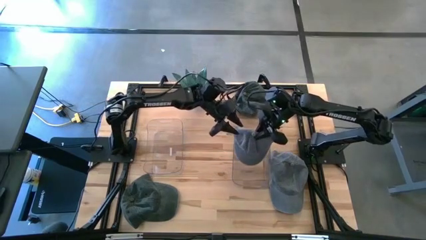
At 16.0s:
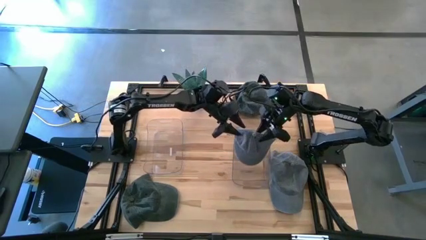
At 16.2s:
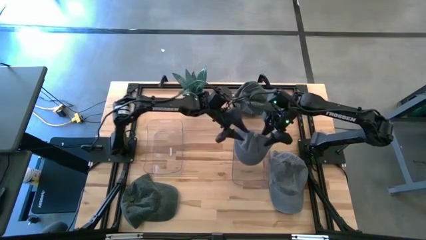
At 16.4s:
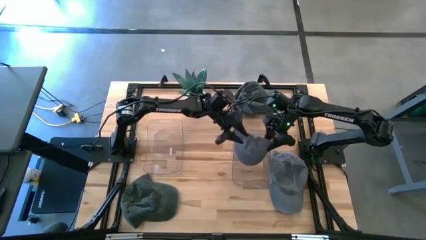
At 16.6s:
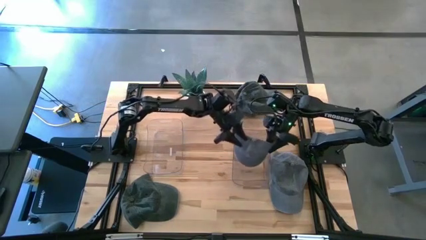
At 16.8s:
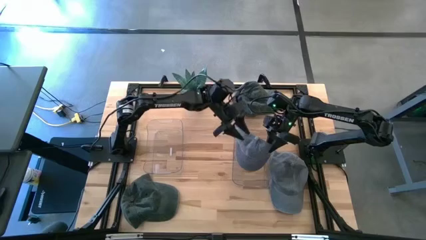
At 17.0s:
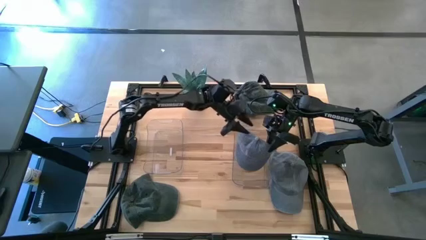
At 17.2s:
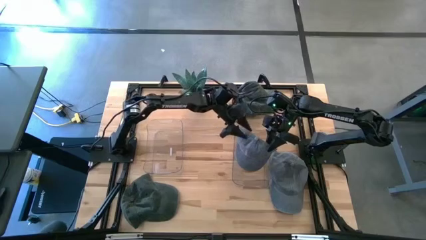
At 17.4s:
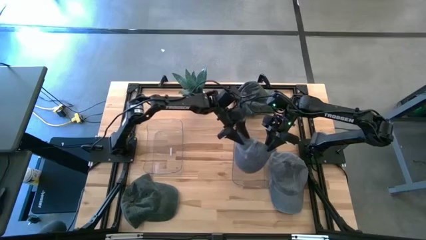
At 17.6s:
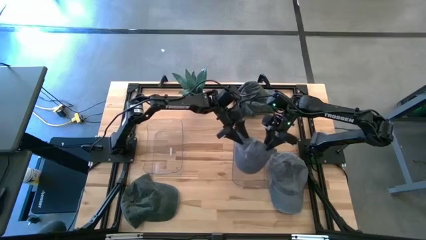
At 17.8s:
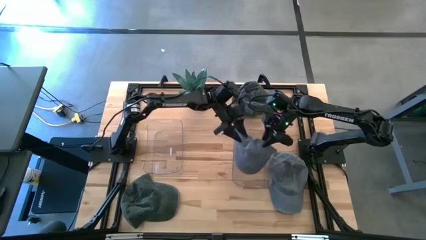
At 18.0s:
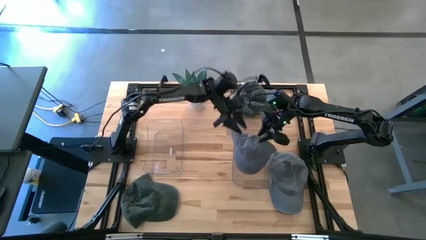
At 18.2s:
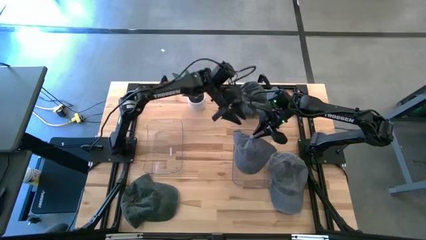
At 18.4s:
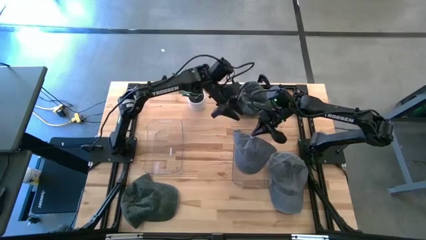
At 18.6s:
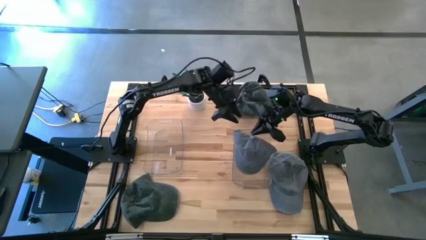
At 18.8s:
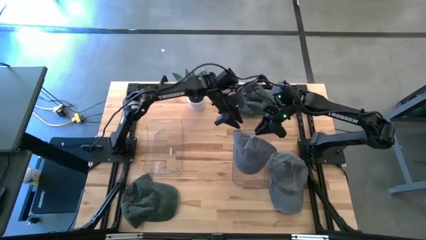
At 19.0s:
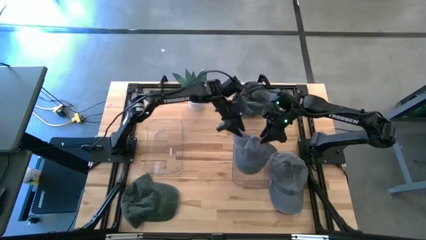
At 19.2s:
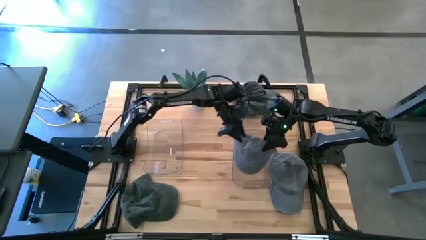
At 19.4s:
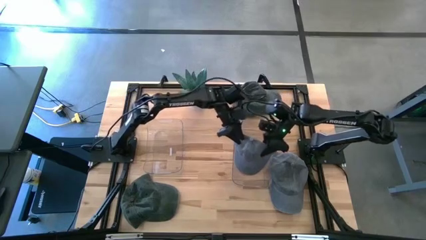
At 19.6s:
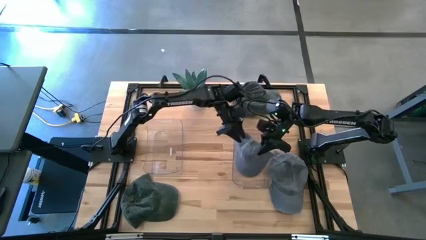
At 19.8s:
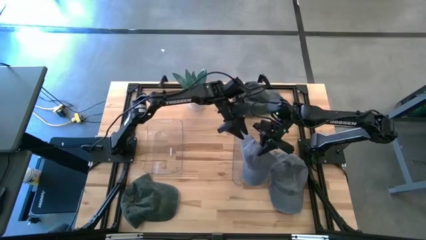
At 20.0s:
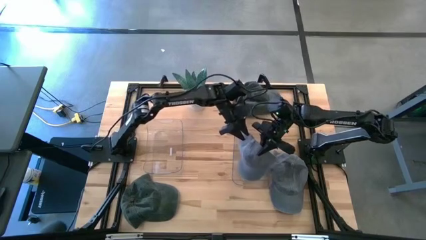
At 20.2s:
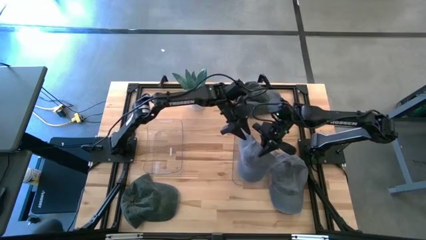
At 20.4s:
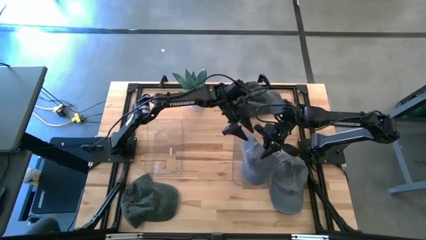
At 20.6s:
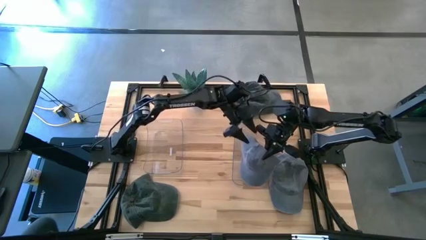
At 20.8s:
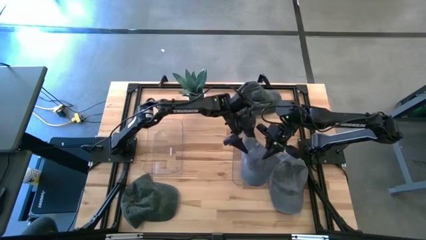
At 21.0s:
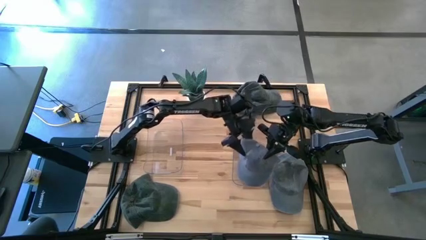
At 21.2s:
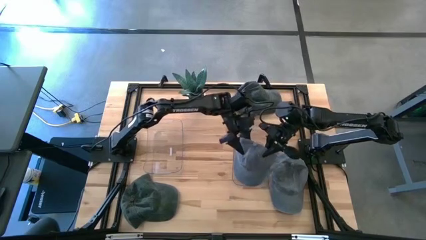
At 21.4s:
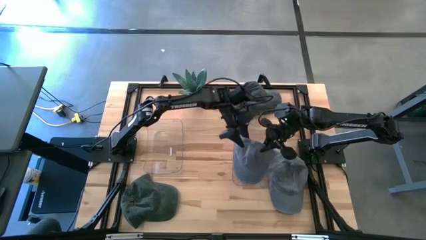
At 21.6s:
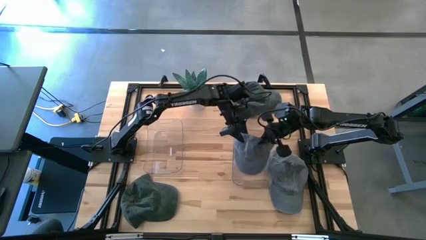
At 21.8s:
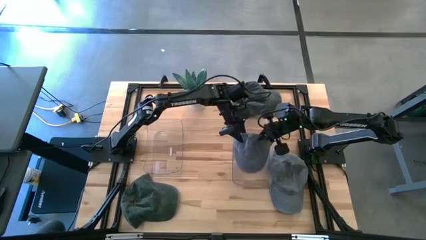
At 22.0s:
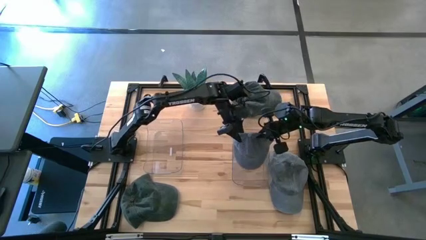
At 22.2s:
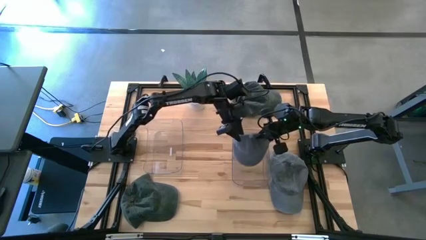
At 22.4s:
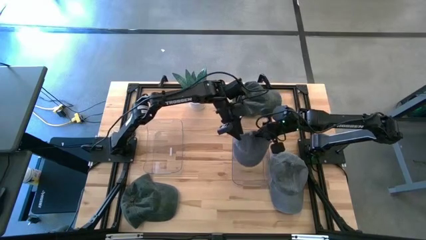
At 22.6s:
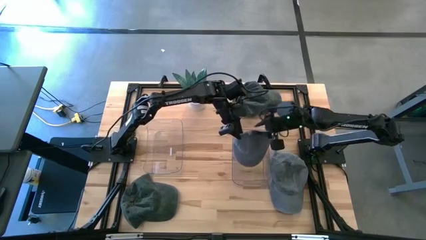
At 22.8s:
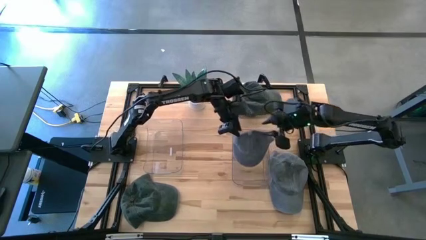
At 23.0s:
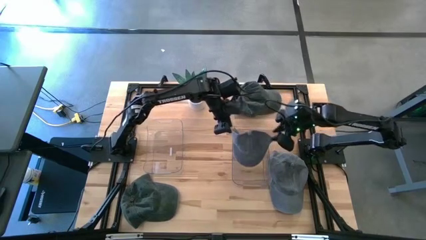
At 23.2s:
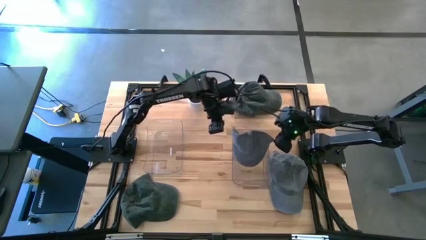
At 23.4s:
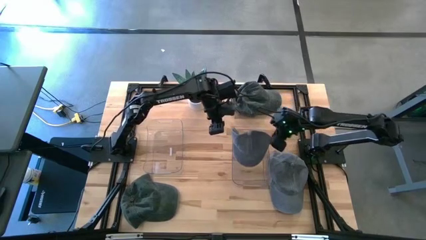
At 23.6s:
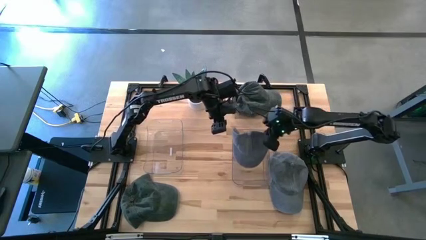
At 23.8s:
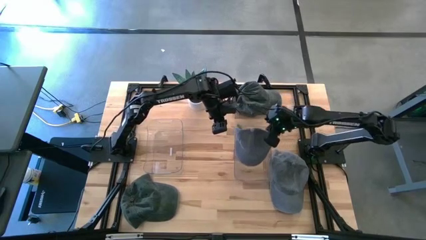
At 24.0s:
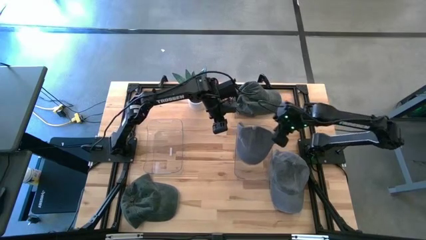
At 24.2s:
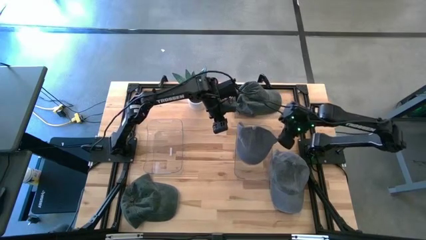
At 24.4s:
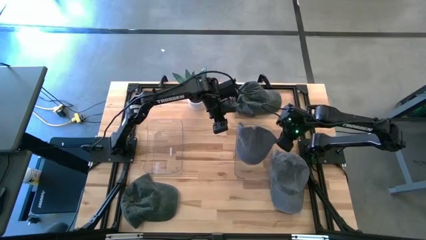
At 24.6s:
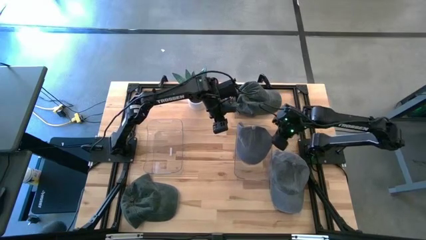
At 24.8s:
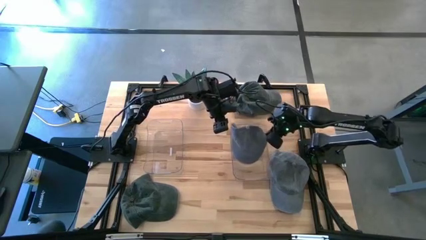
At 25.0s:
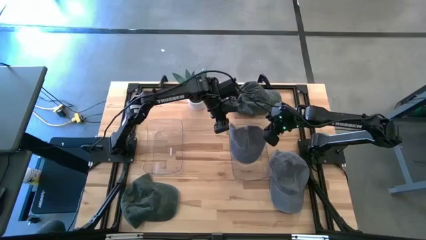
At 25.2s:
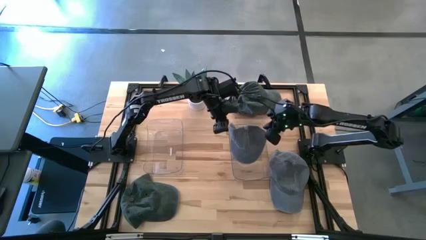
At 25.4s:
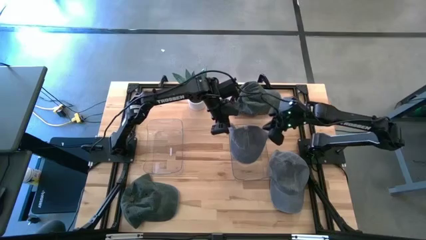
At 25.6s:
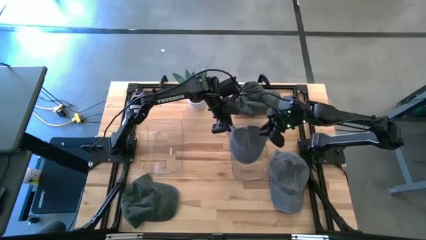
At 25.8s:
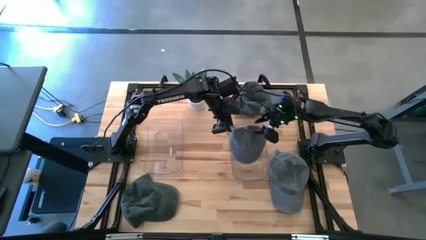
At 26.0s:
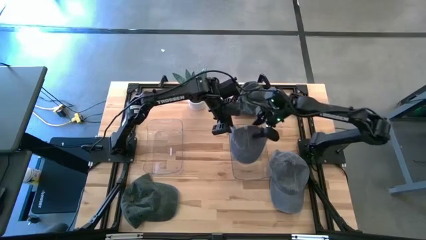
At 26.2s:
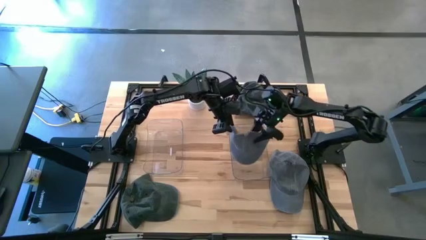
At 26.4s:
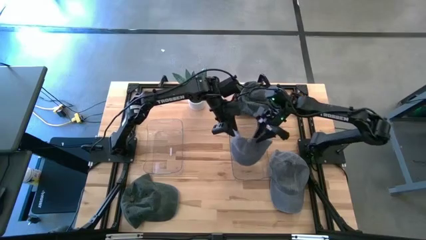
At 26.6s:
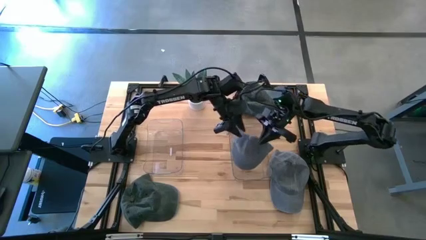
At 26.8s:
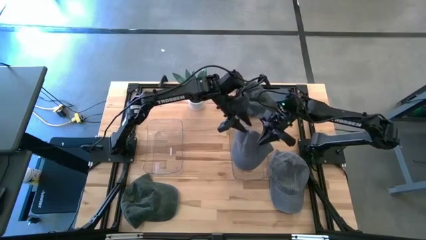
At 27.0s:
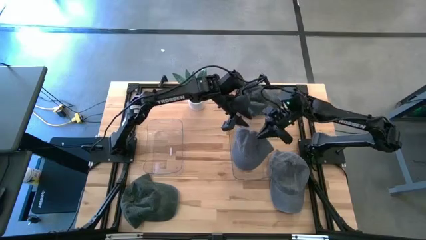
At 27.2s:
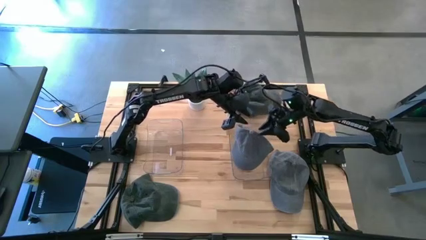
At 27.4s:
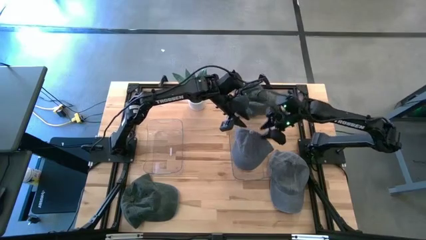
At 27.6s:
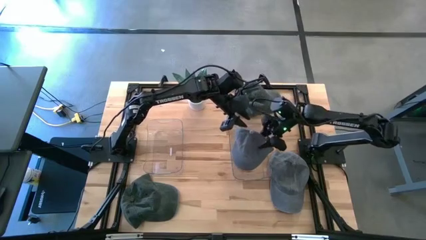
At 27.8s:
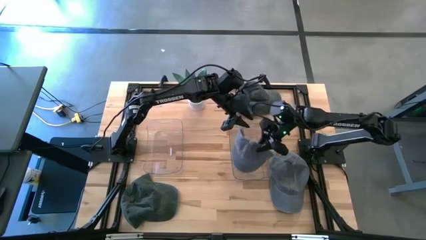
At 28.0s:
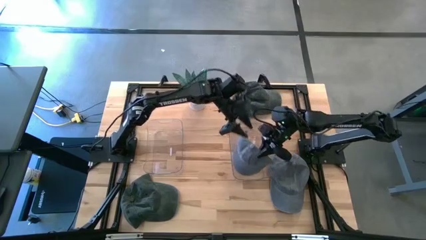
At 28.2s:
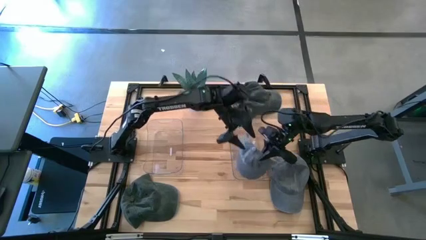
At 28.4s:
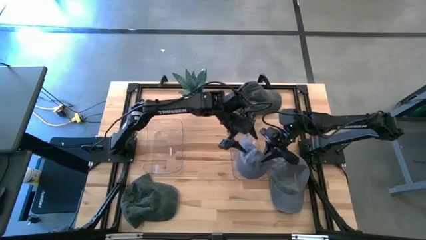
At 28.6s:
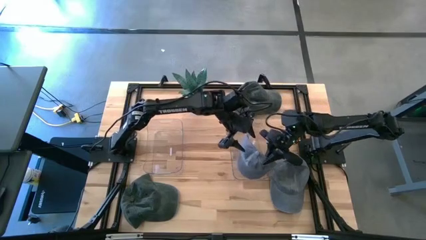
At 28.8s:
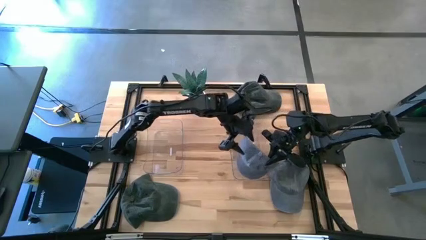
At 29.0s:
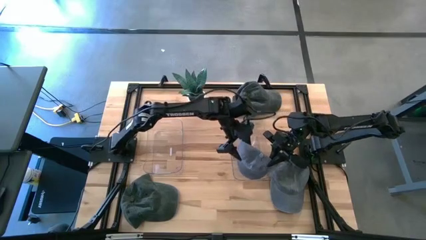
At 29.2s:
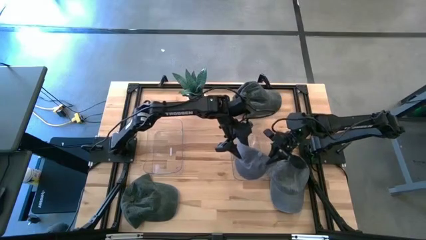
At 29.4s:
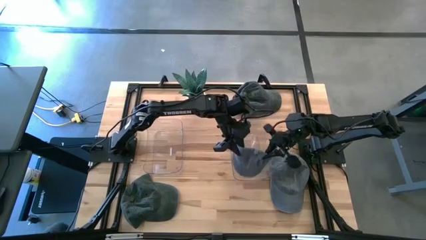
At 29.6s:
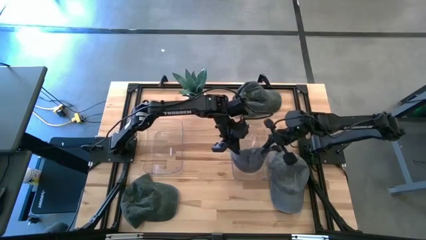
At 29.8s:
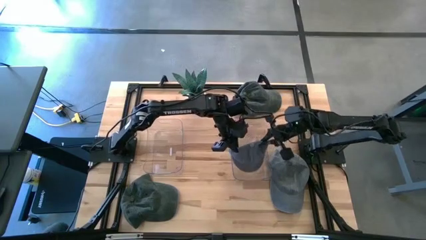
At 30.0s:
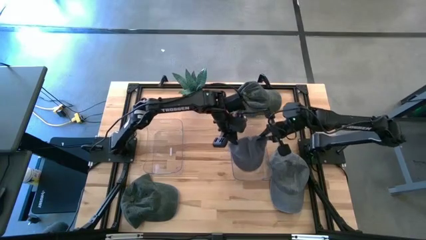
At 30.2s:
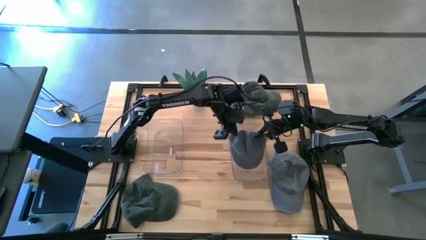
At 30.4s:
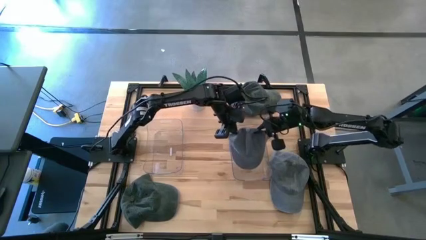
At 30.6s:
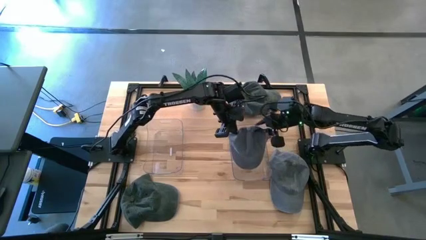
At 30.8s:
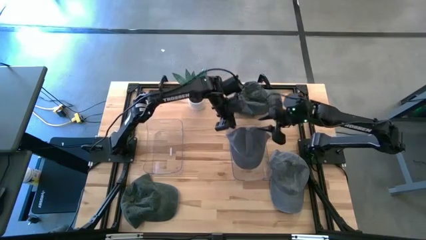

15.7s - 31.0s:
Task: Pick & Place hat
Put the gray cap into the right transparent bin

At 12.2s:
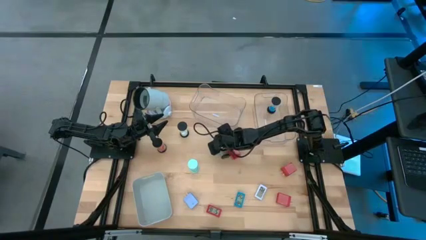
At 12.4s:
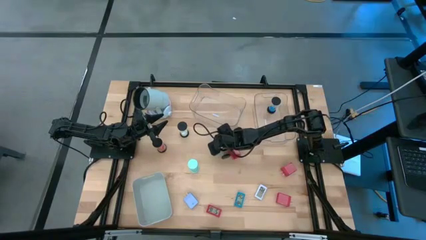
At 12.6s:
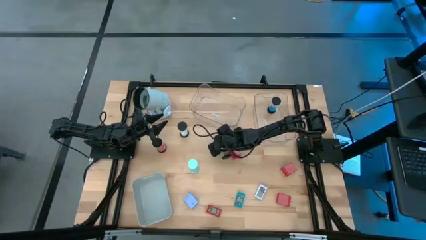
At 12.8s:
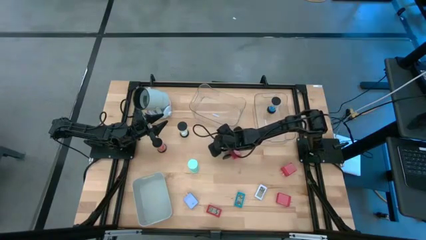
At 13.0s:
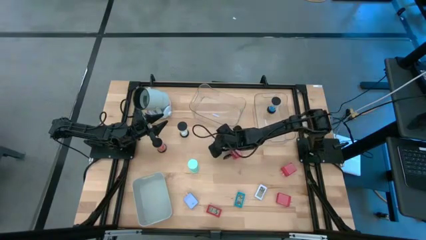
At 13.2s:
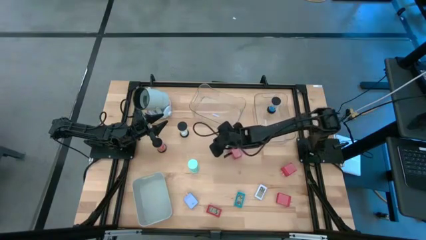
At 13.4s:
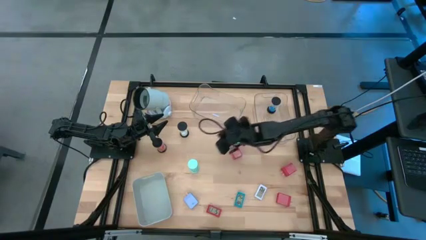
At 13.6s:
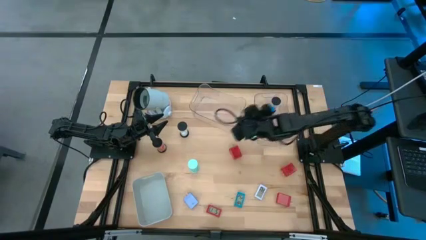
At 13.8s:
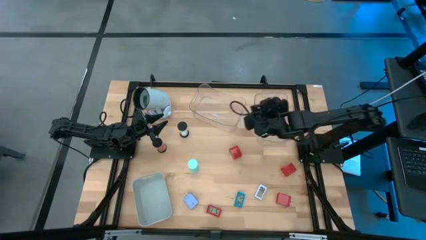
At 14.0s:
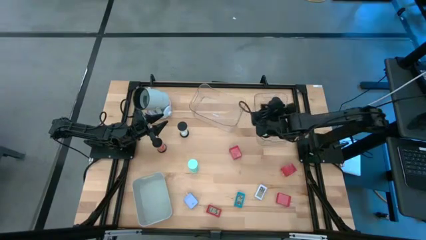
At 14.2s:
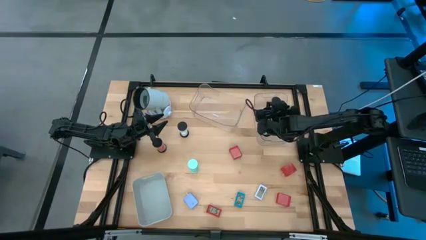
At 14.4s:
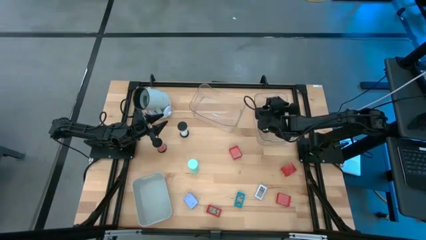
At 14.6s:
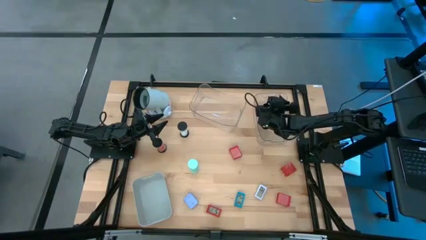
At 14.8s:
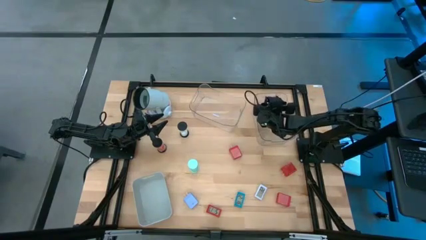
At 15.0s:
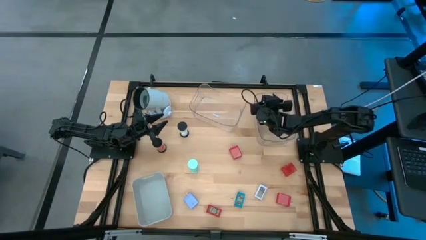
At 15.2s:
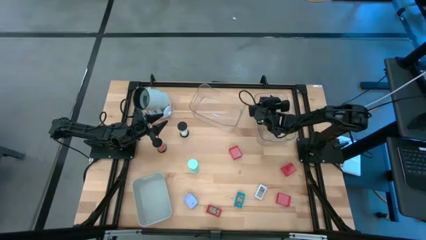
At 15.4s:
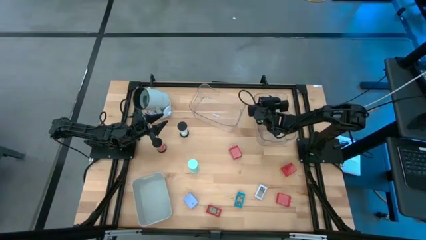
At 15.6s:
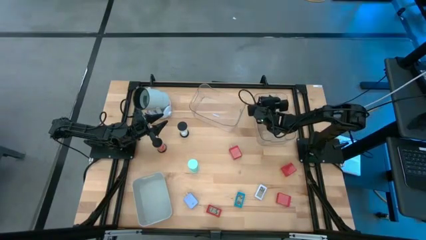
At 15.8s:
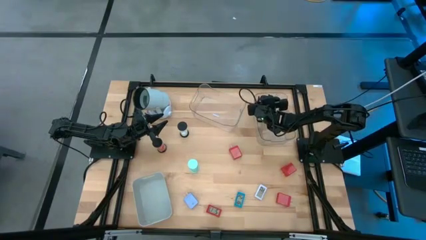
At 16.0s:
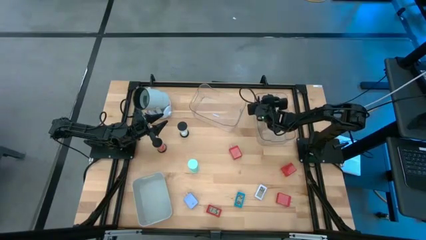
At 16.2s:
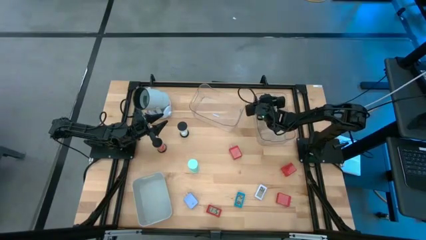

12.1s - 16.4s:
Task: Pick & Place Office items
Put the dark blue hourglass into the right transparent bin
